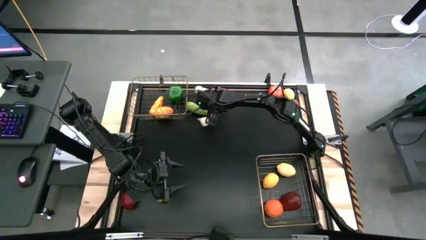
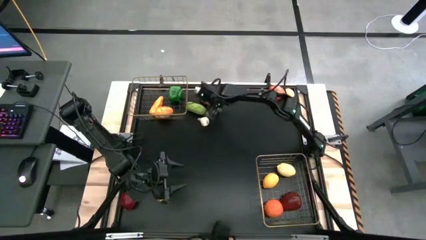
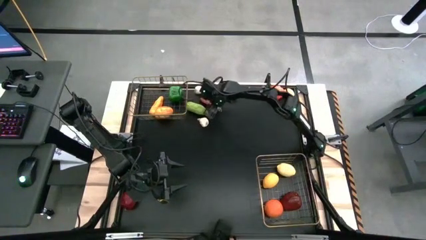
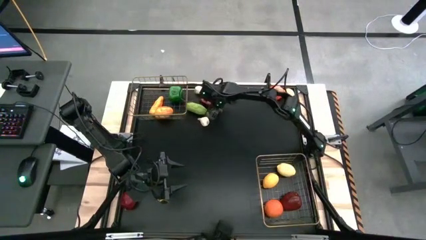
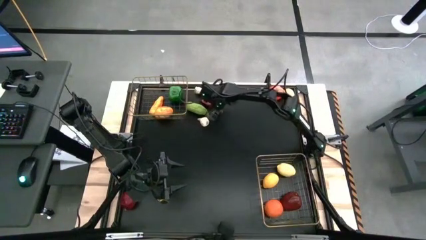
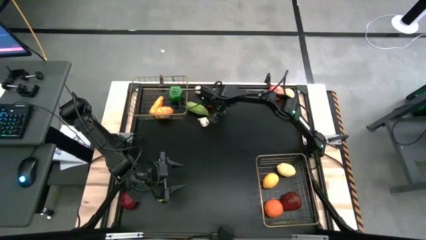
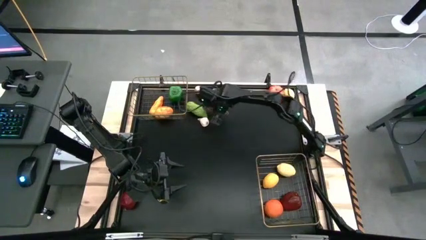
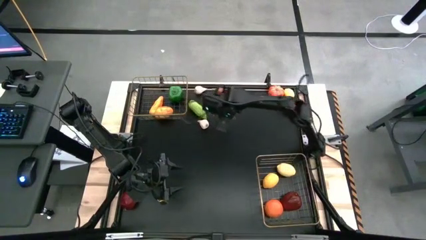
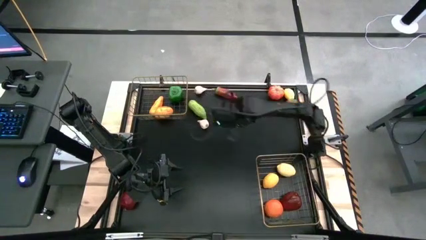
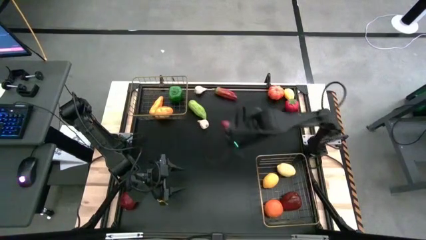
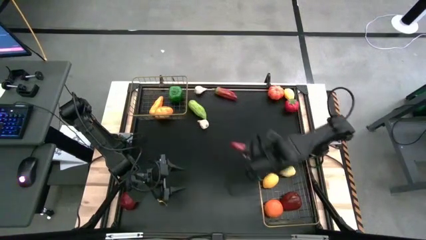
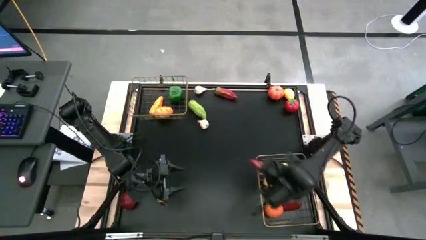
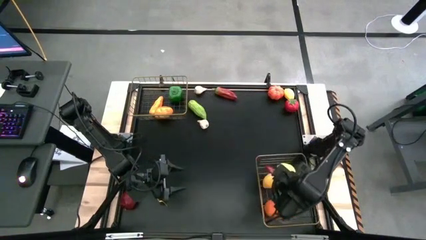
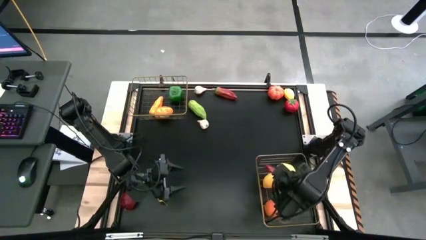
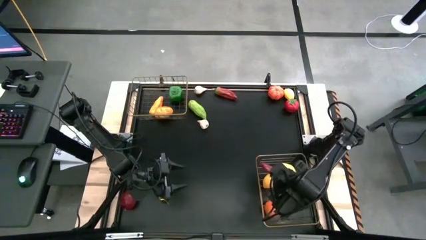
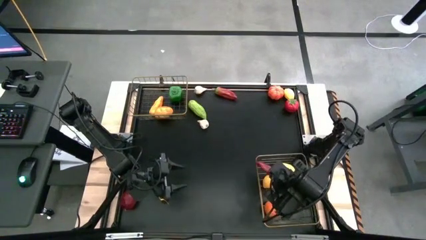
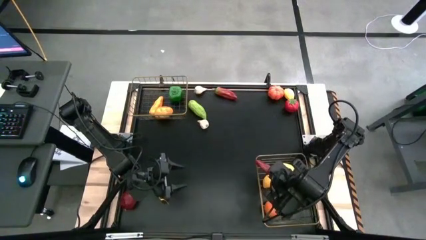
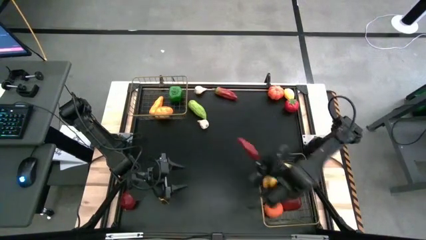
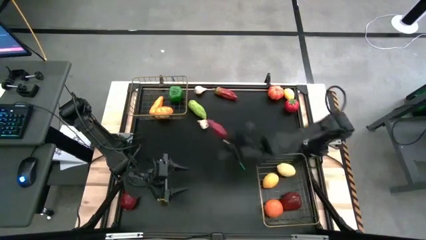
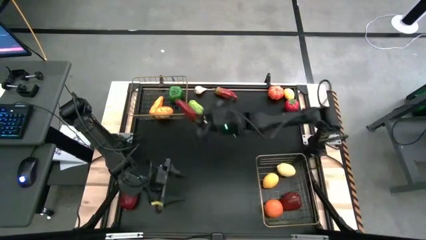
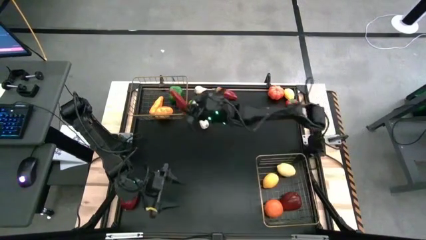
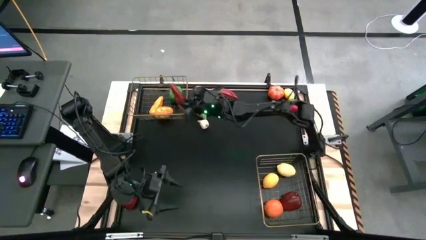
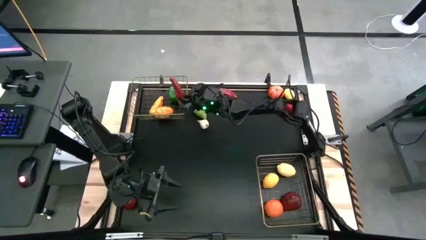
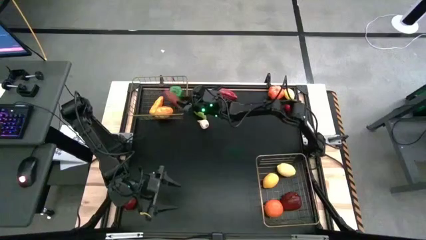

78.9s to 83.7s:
Task: Sort produce into baskets
Put the bottom red chili pepper into the top wire basket

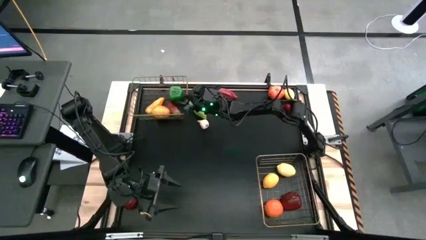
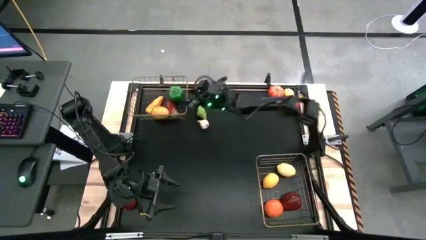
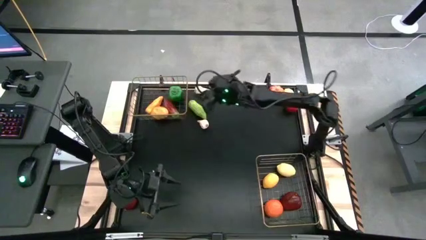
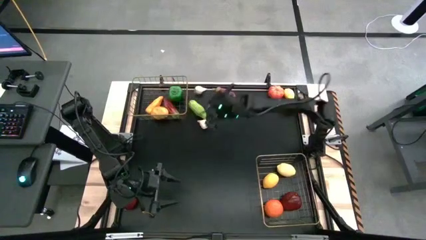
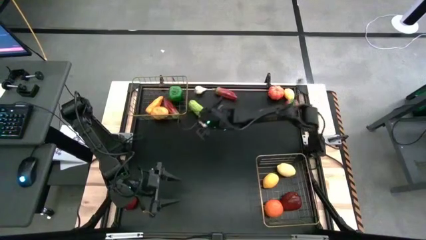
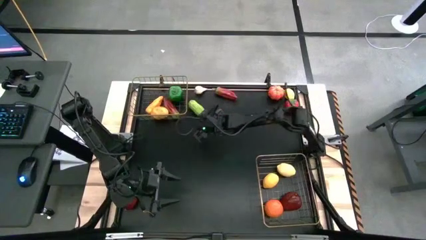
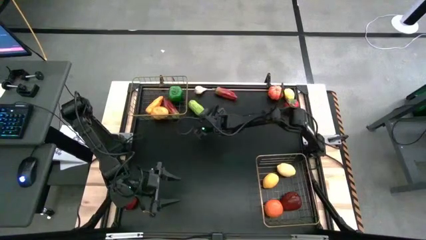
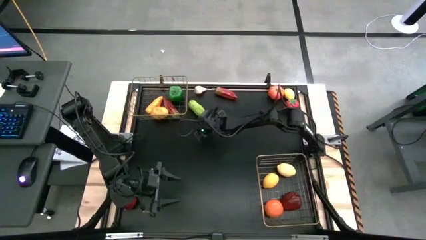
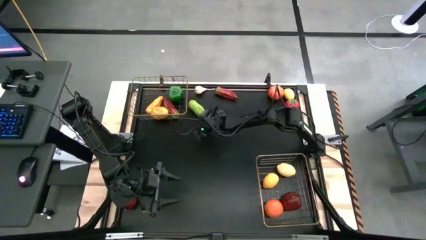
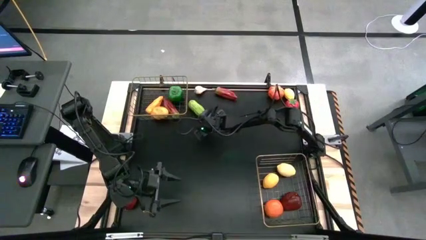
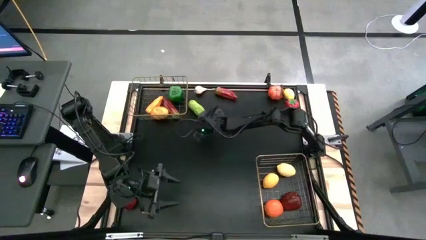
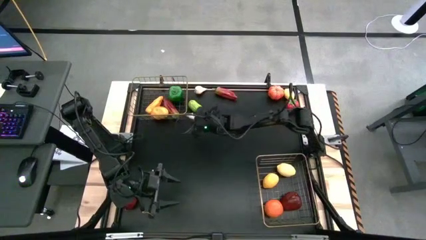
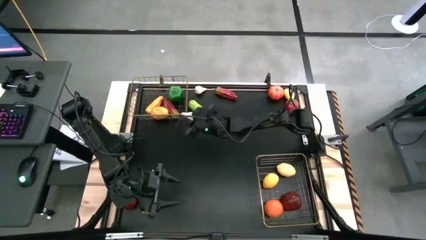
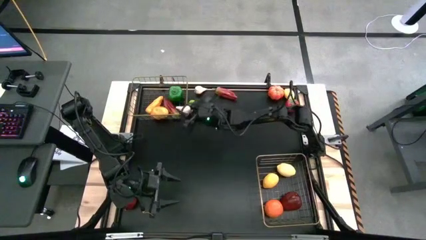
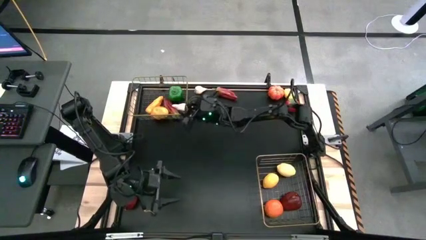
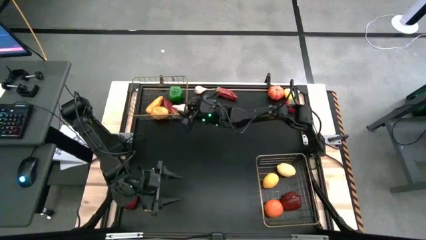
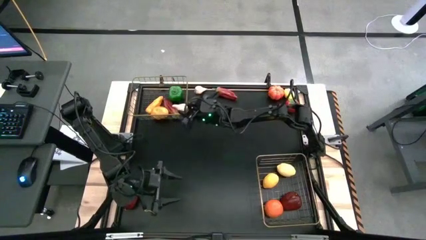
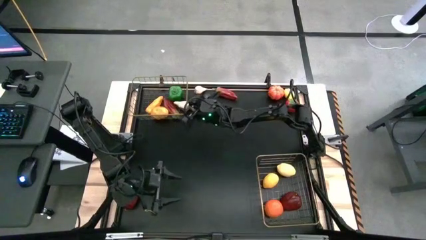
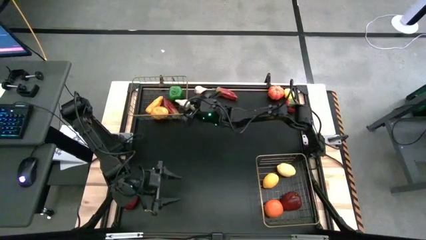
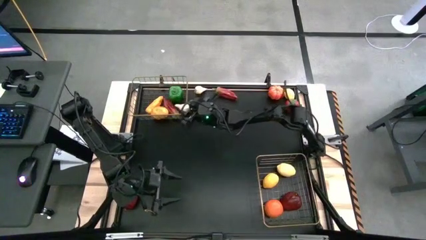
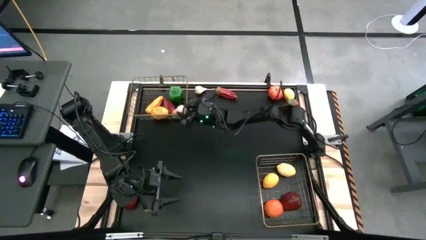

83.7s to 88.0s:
Put the bottom white garlic into the bottom wire basket

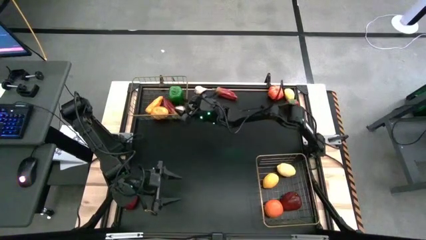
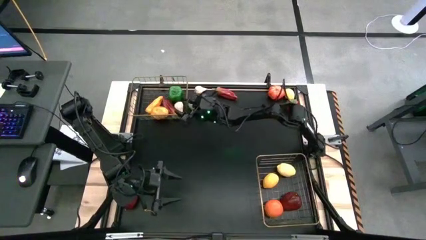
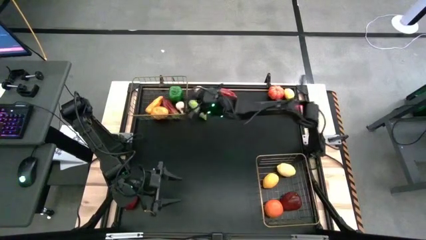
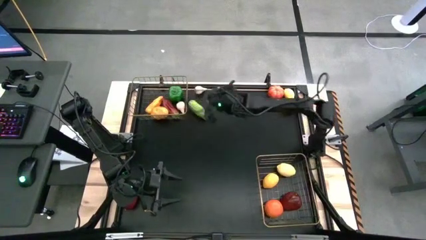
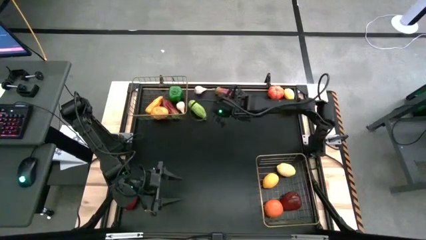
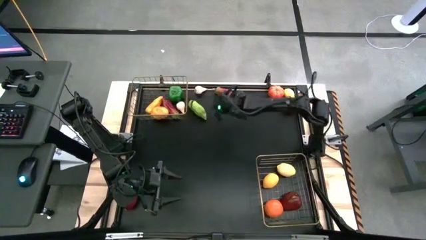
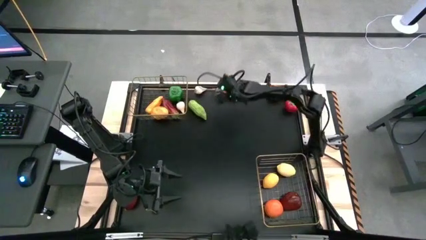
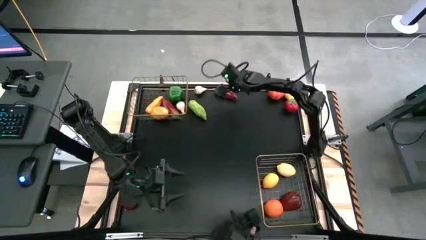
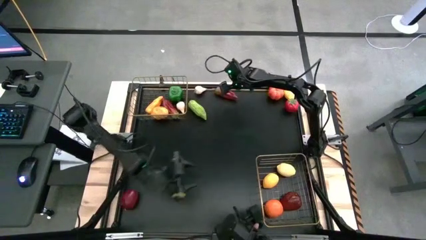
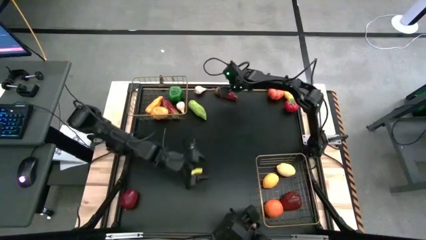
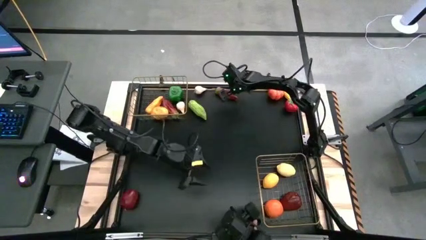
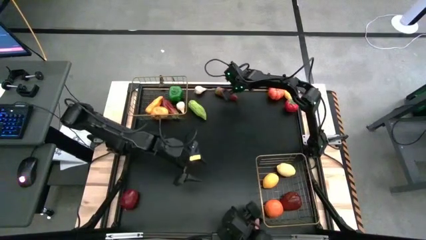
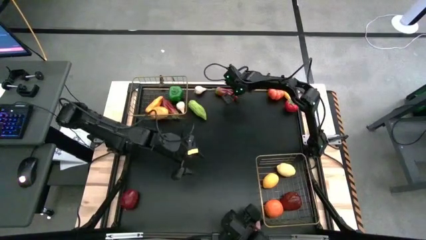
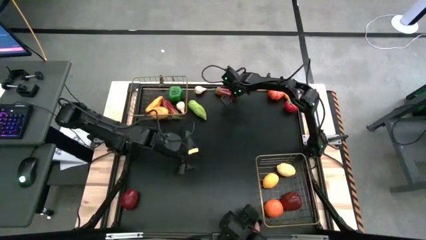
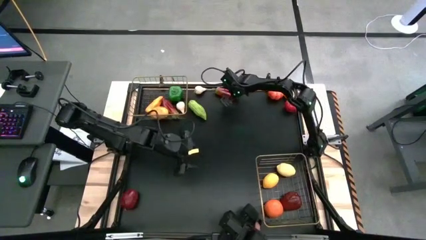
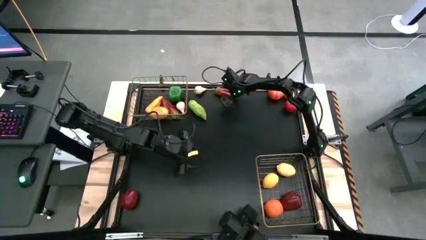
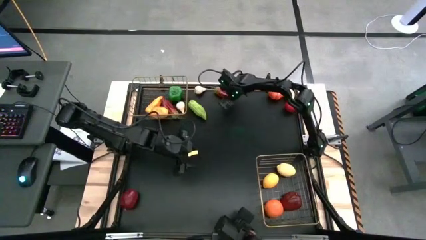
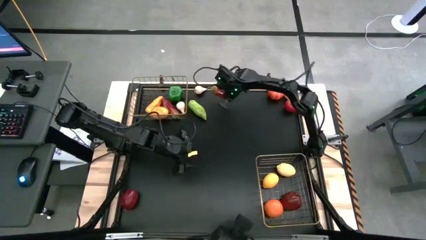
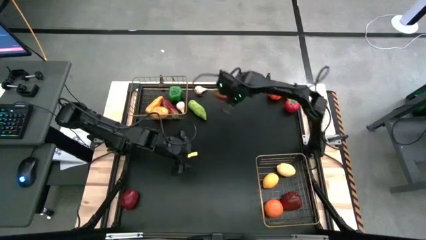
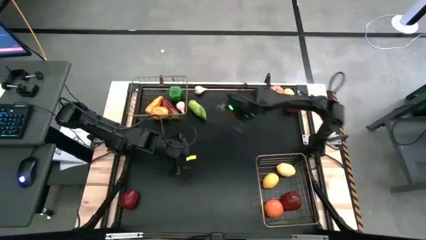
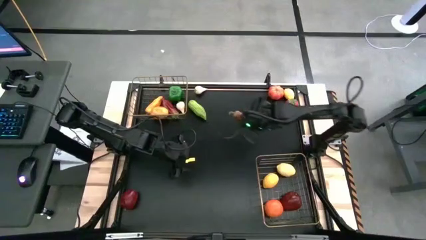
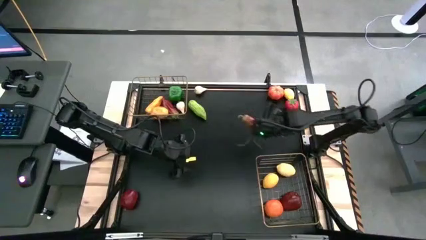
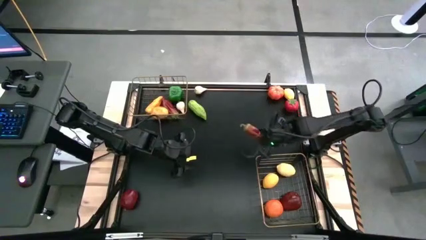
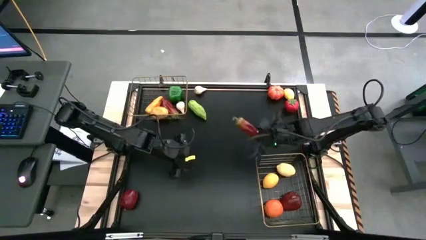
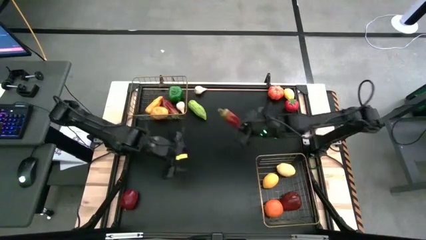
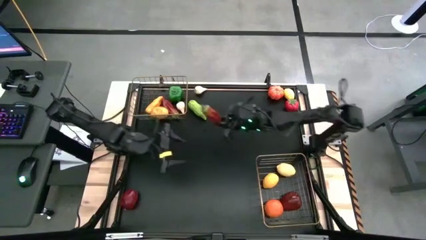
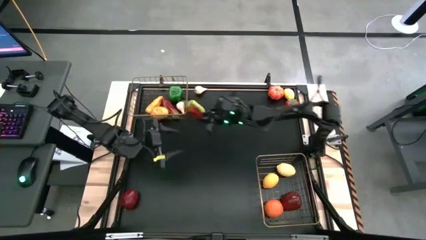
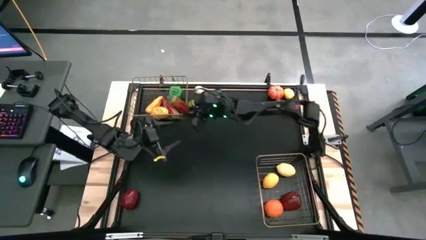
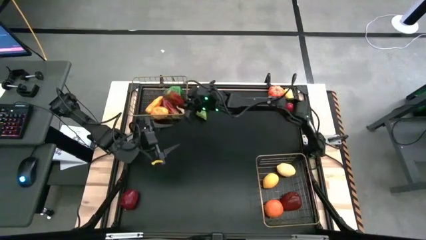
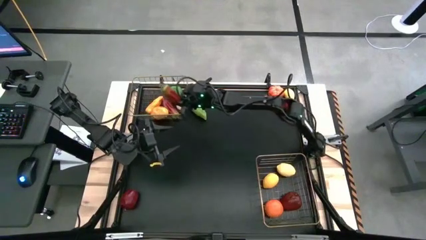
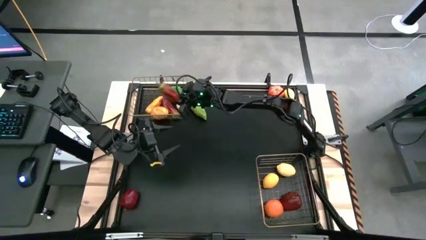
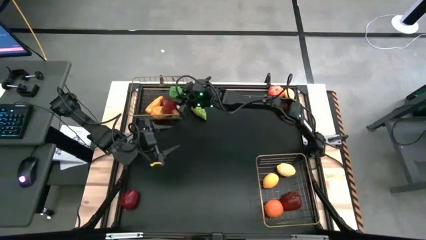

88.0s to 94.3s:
Put the red chili pepper into the top wire basket
